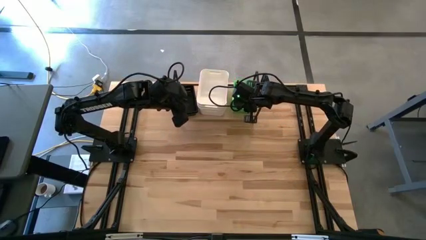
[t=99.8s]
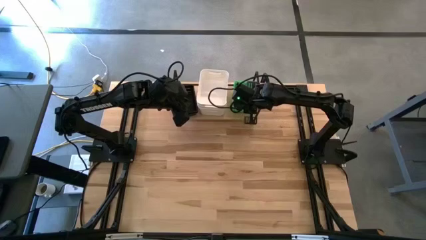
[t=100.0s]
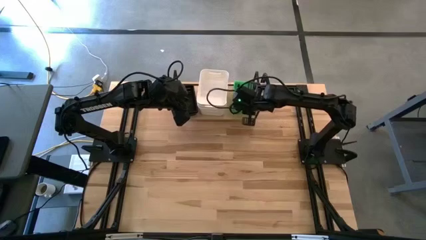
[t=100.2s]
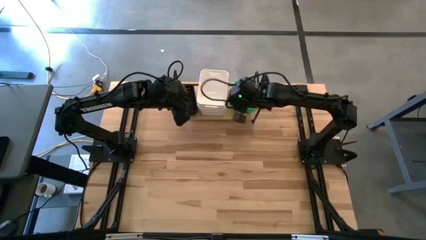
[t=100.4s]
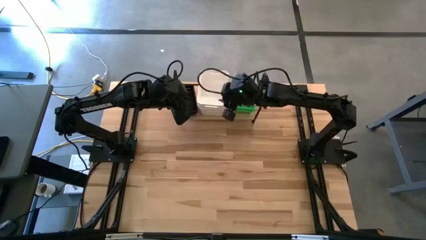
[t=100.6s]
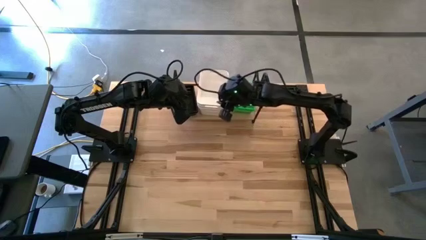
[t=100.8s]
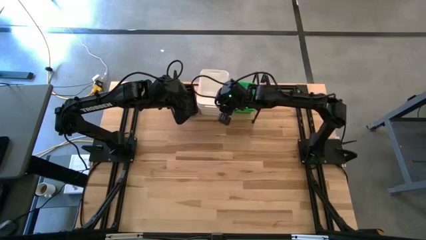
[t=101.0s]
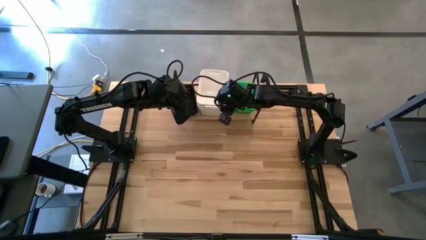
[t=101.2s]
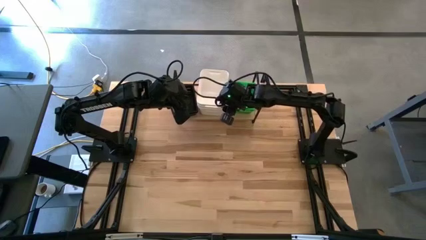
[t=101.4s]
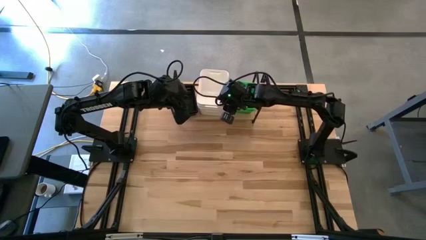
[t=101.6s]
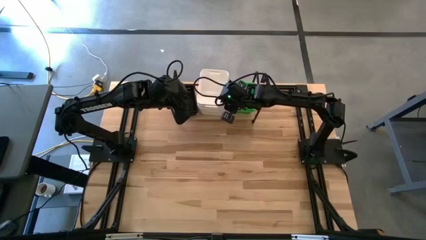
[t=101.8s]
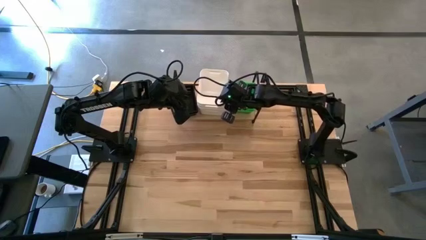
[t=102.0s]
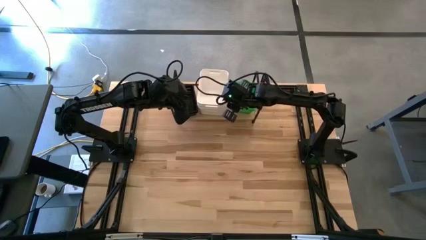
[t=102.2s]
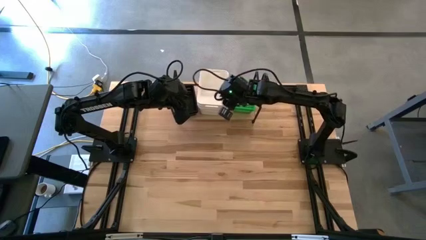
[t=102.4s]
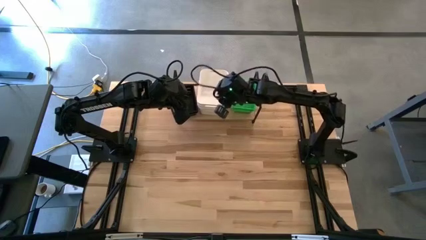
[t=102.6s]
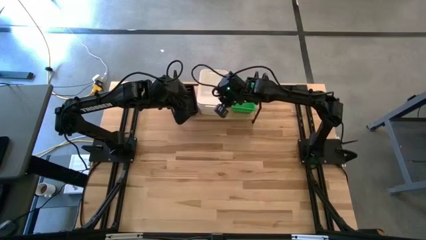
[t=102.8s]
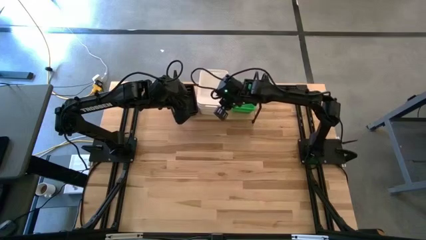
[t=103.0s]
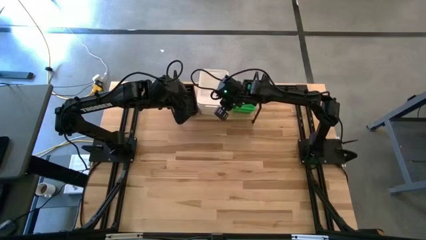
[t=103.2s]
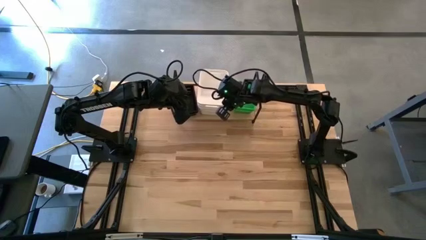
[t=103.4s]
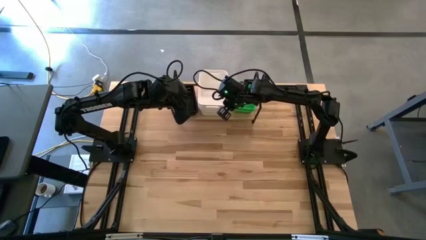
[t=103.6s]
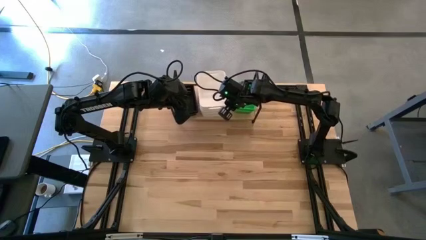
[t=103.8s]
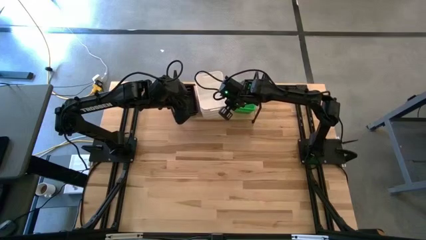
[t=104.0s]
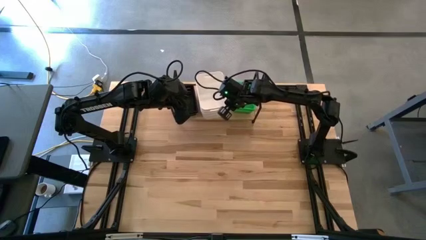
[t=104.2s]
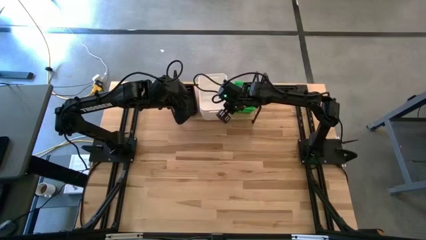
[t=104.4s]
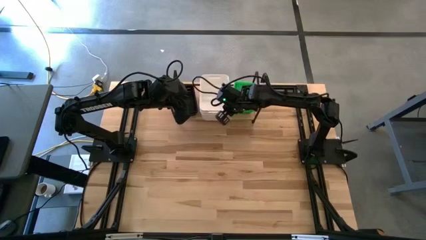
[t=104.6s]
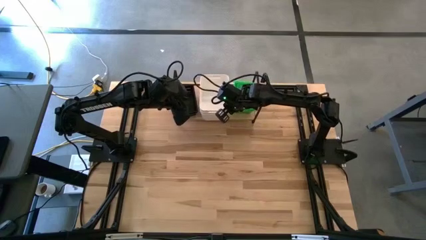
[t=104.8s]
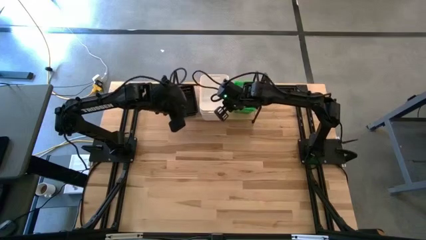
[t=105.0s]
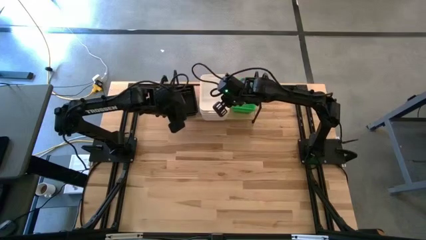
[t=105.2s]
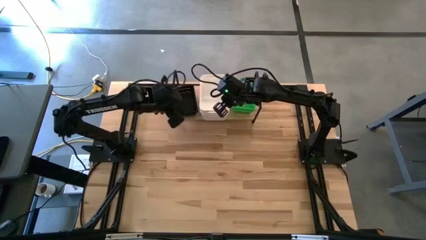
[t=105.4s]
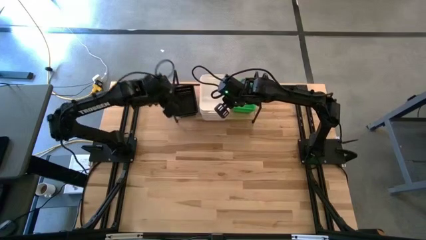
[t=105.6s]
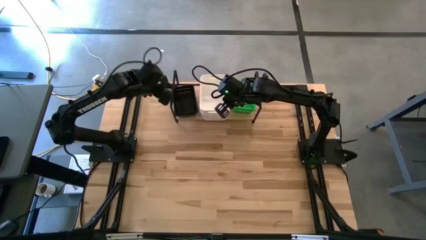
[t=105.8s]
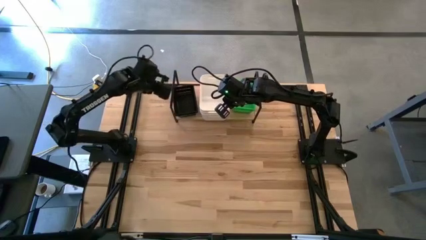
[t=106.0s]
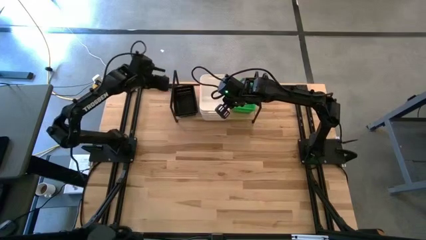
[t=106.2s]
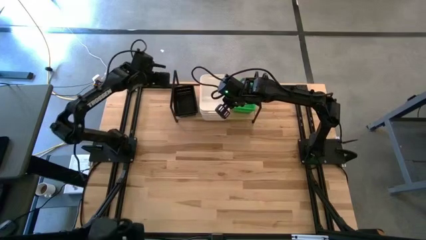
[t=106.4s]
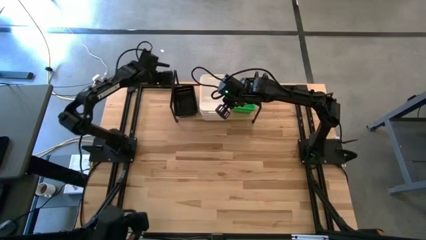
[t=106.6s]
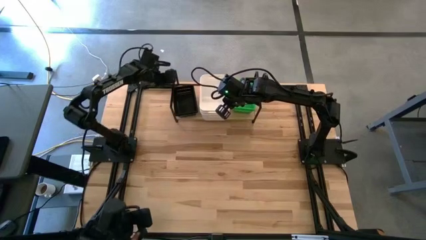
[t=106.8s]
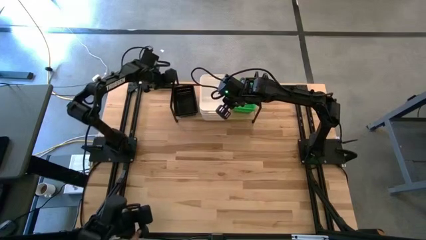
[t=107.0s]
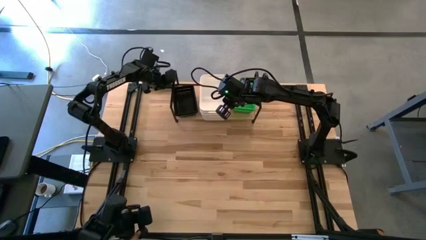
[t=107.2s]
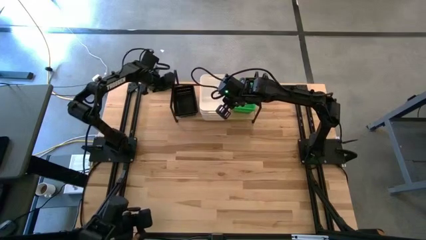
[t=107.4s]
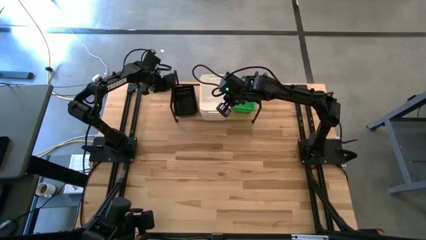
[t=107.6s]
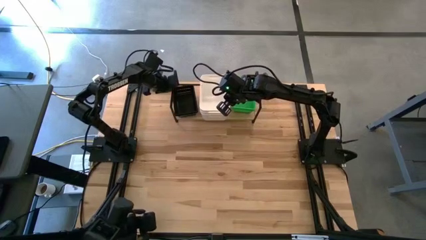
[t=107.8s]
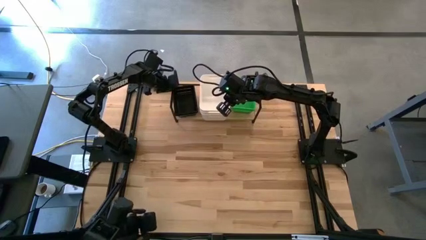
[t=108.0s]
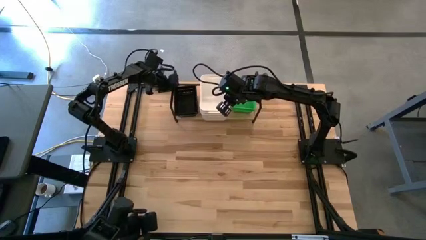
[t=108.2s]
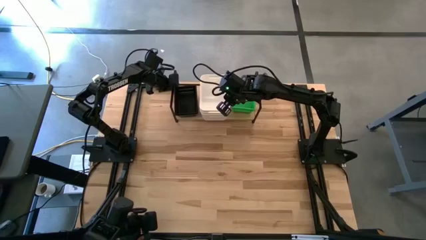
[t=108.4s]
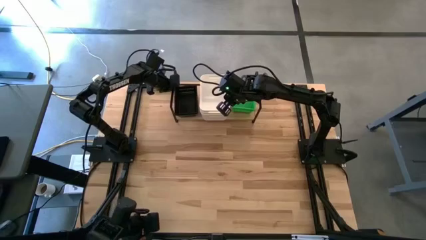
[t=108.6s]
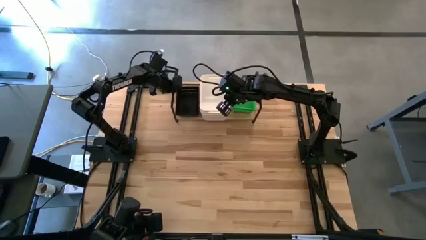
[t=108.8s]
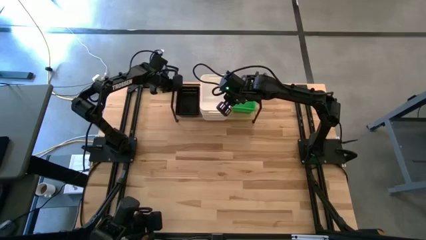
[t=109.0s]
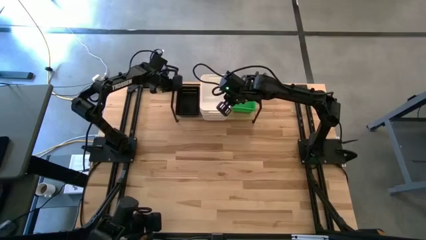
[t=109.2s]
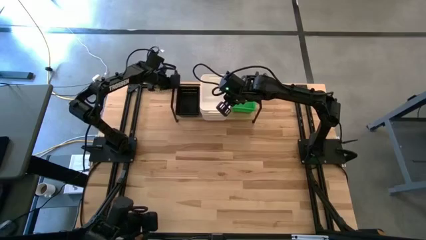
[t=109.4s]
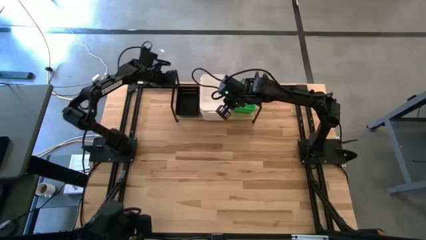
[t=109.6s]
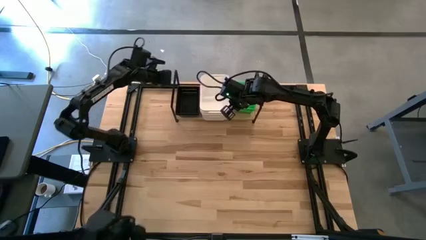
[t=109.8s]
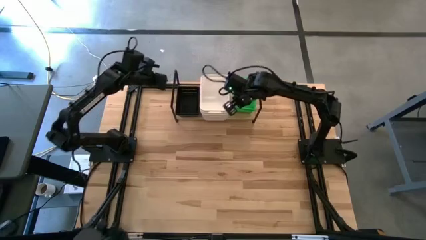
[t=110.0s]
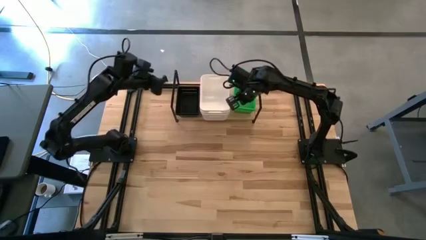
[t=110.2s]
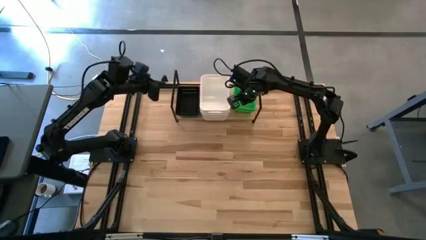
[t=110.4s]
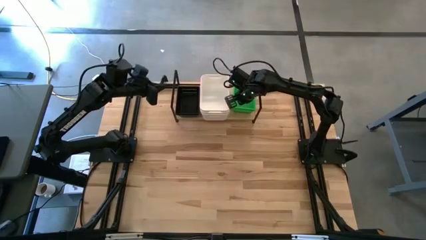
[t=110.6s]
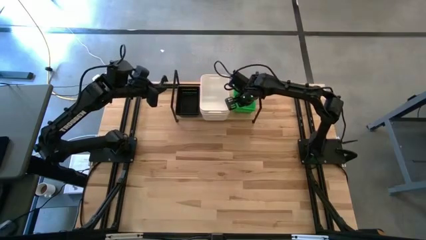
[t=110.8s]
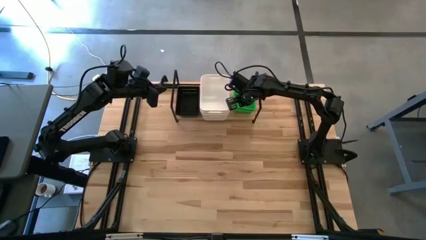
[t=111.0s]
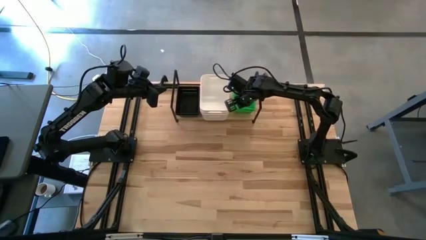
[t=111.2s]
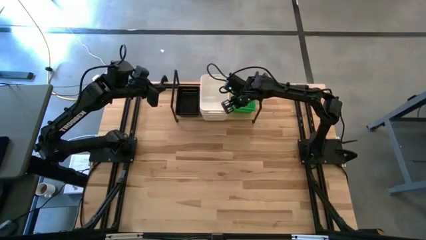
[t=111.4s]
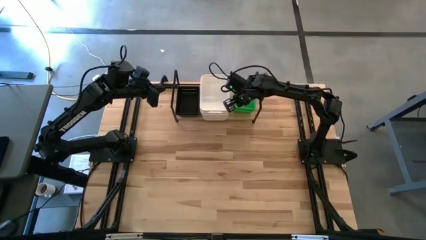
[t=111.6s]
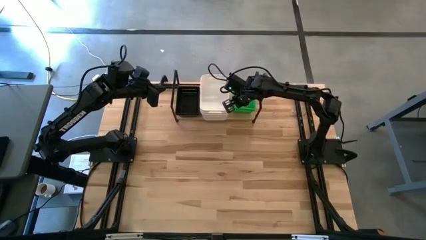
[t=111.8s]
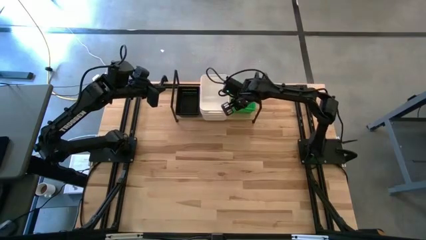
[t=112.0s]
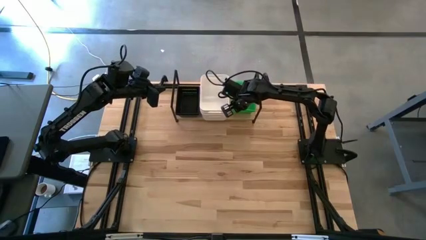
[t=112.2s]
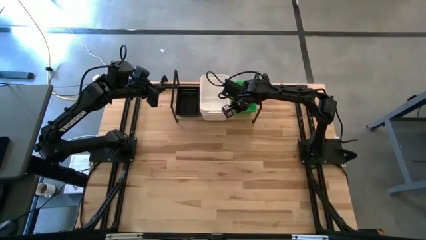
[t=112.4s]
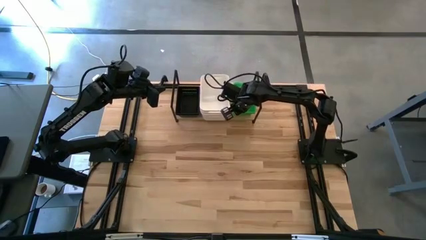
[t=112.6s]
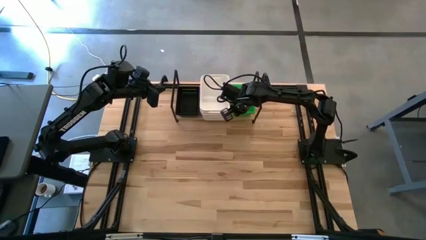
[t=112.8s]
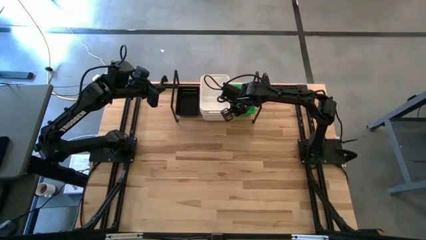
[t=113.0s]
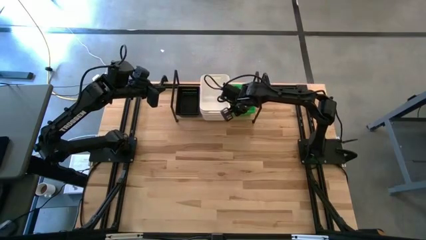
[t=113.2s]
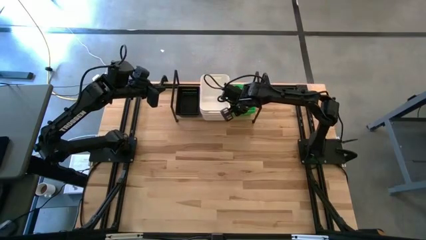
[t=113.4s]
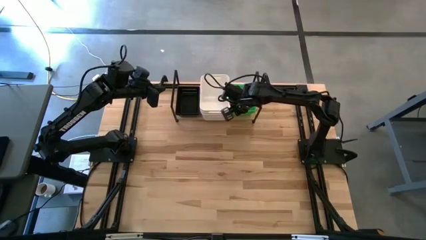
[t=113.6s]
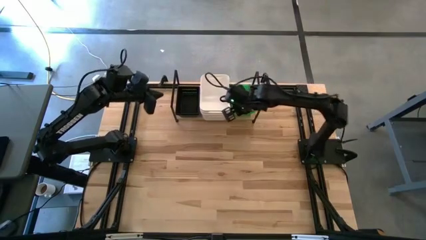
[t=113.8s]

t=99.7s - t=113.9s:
Task: Stack baskets on shelf by color
Adjust the colored bins on the shelf

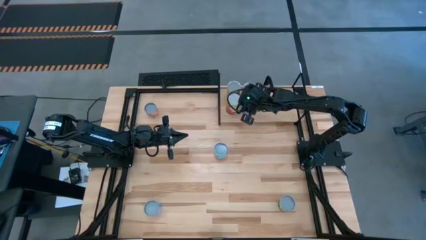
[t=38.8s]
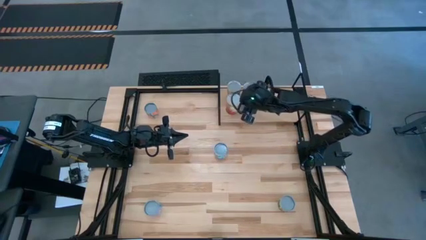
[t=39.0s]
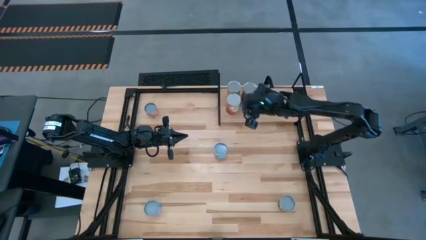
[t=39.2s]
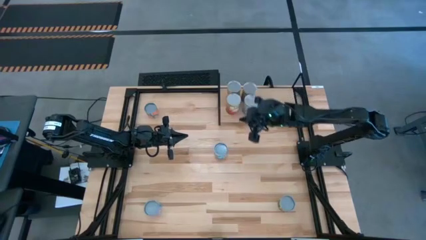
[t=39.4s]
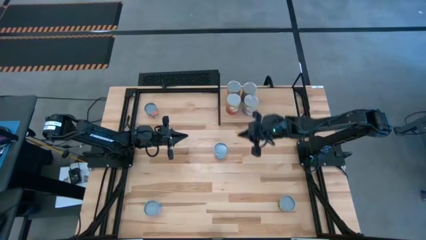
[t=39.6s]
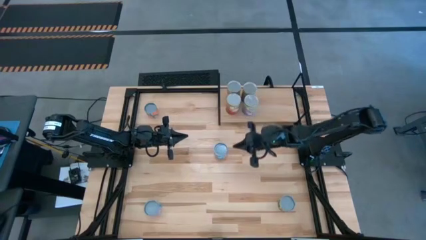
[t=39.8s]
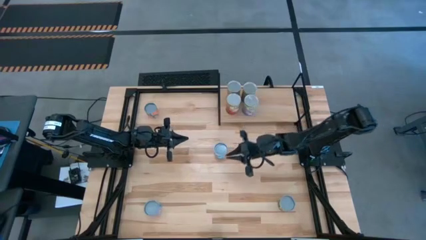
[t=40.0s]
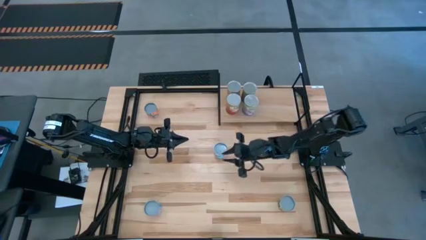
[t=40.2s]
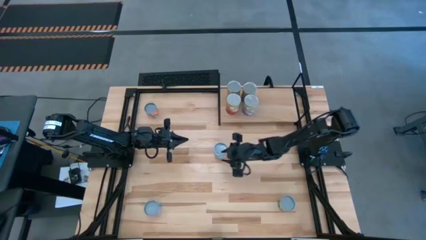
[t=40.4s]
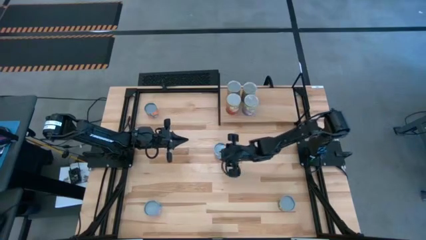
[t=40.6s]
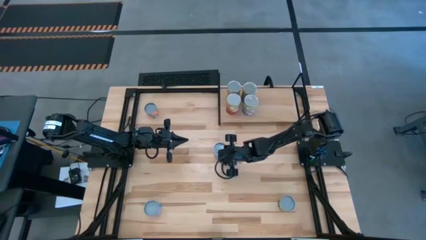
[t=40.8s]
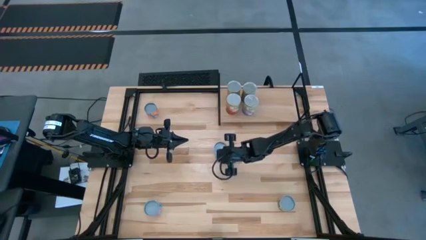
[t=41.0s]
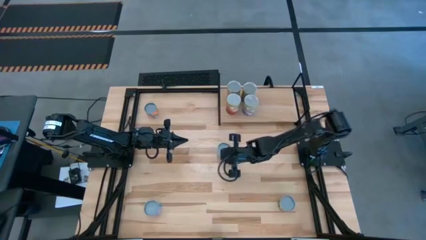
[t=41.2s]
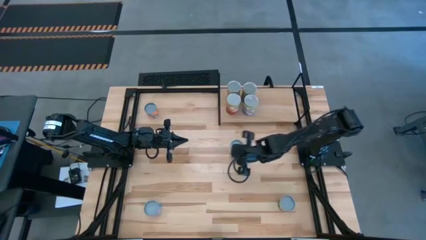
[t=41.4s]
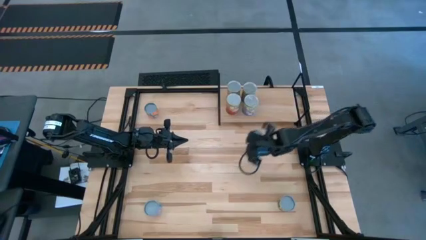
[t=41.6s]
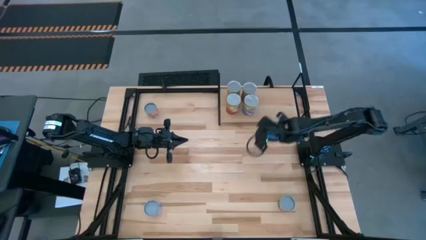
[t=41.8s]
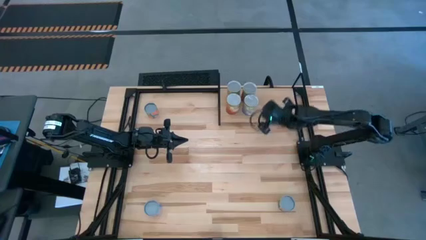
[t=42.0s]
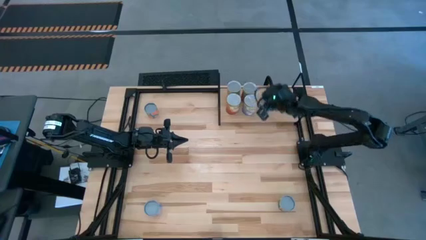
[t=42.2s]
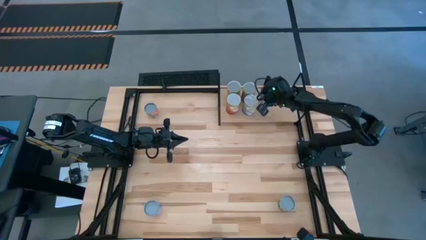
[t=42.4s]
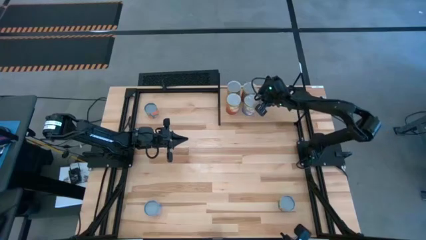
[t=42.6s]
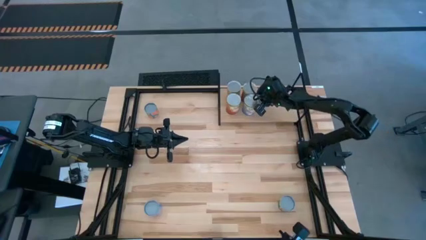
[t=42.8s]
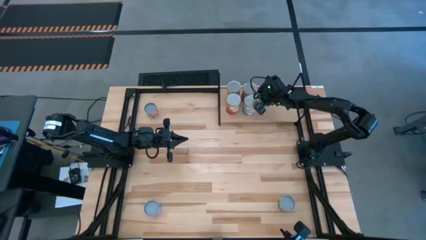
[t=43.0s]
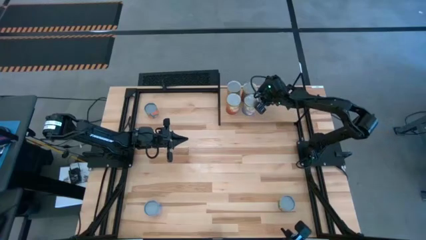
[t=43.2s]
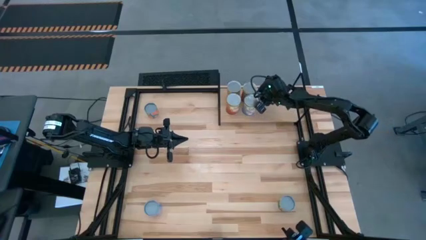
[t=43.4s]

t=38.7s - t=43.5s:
Task: Pick and place cans onto a shelf
Put the canned carrot on the shelf
